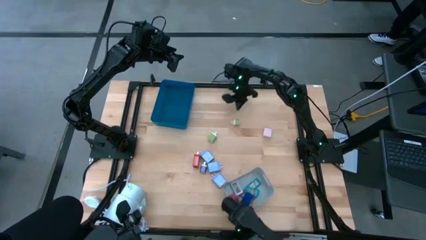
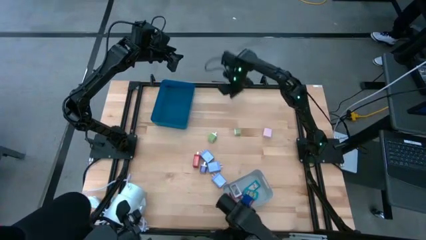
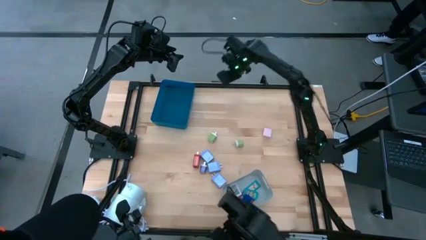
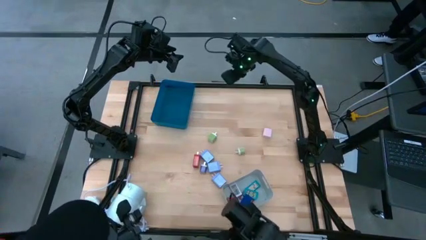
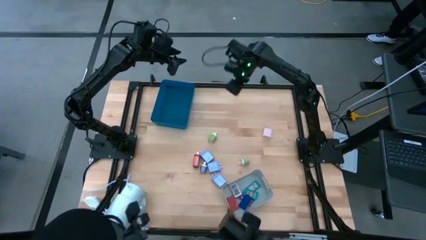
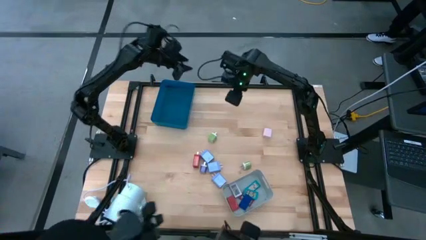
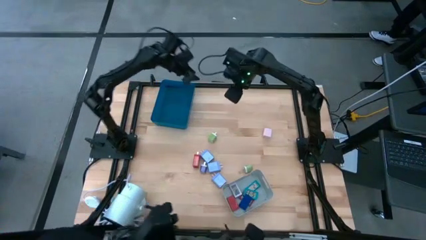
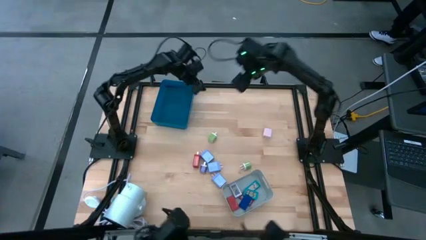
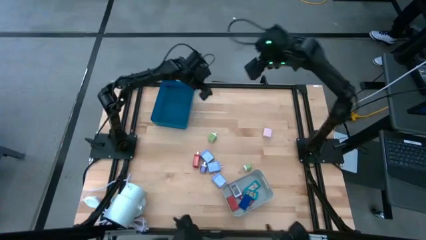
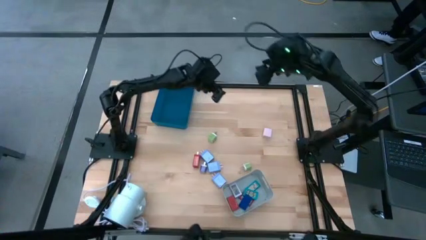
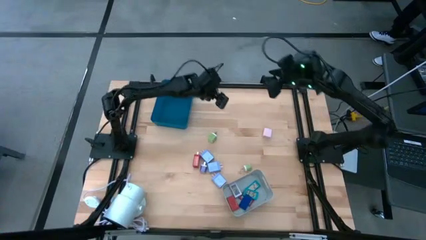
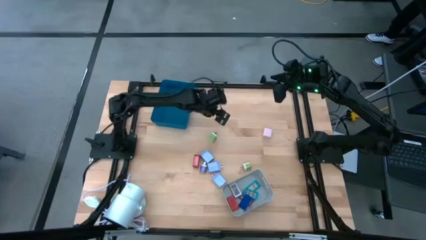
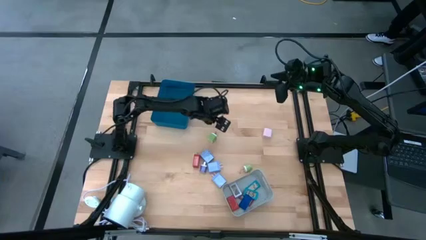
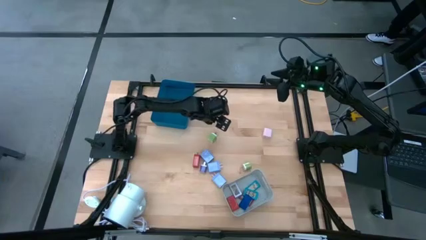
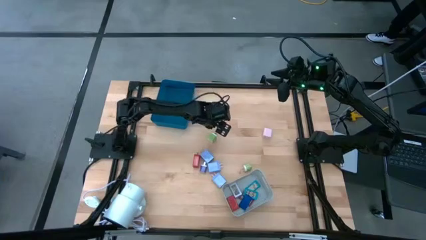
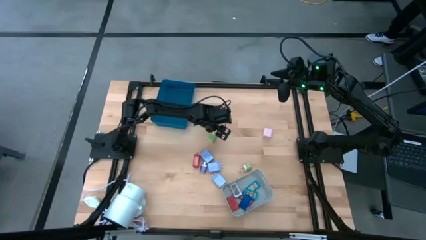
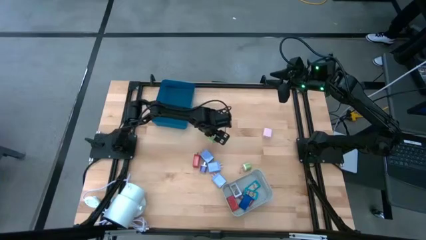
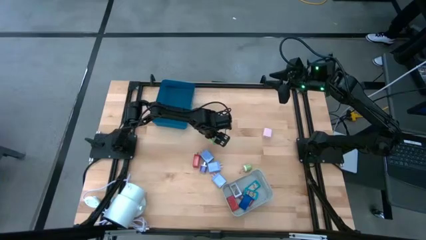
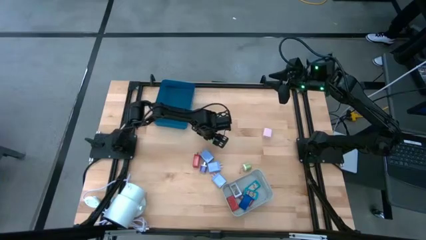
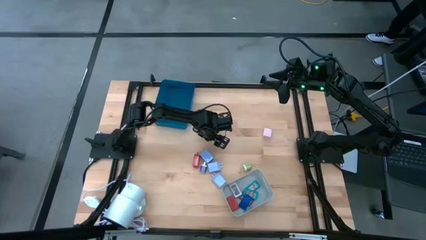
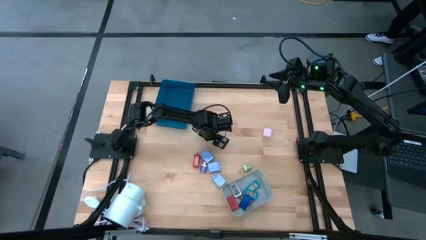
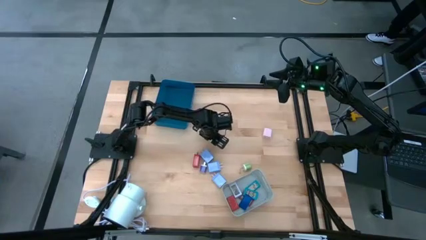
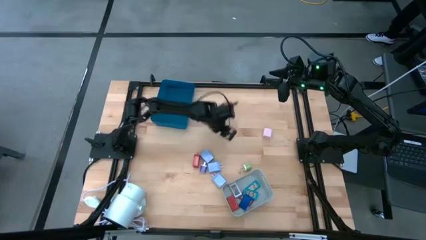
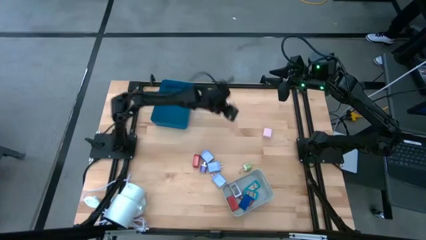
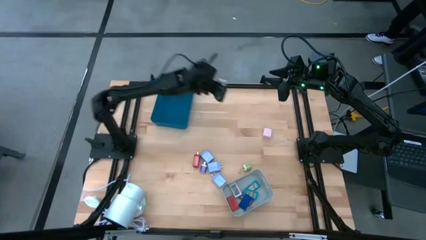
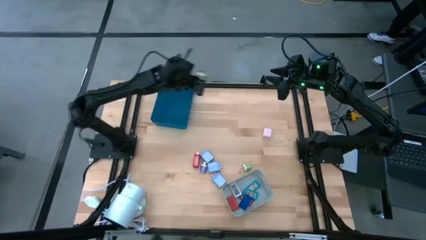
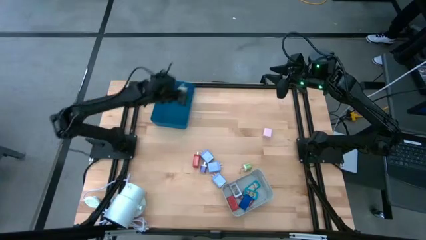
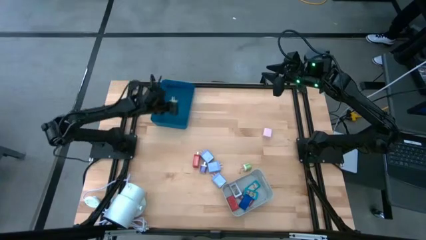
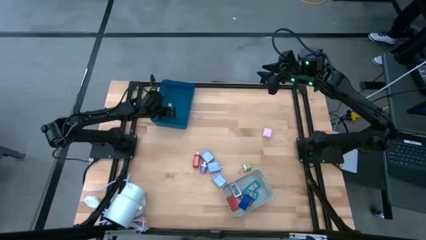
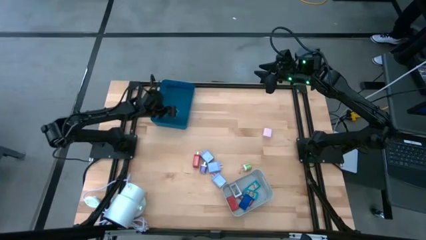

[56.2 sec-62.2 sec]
Task: Pick & Place Office items
Put the top green charger adapter into the blue bin

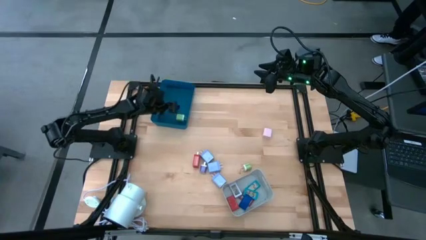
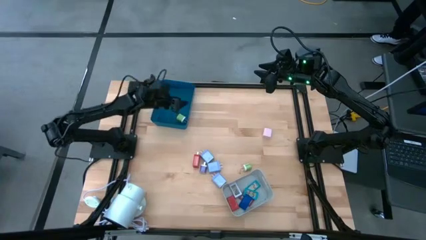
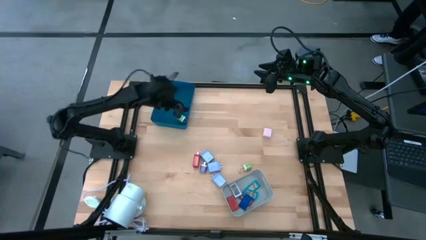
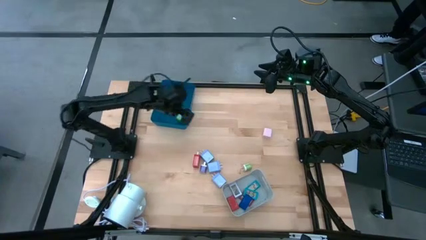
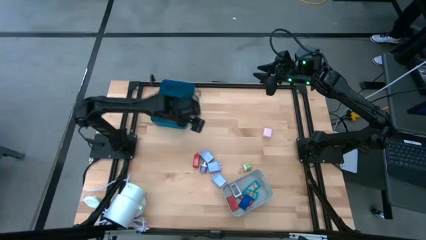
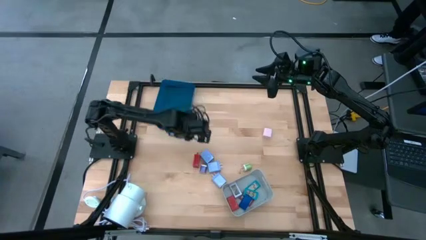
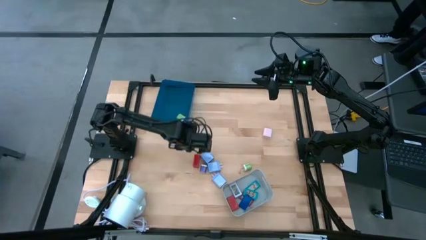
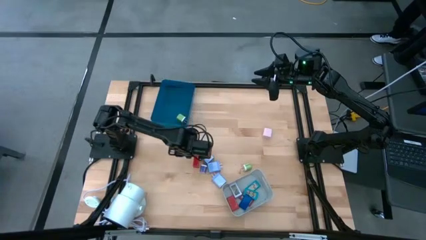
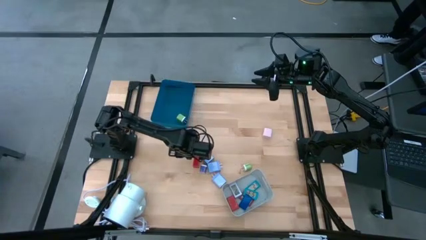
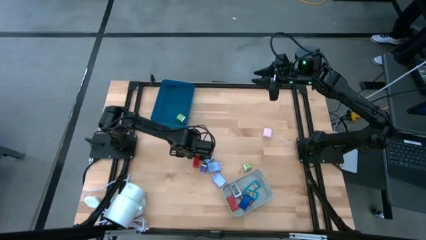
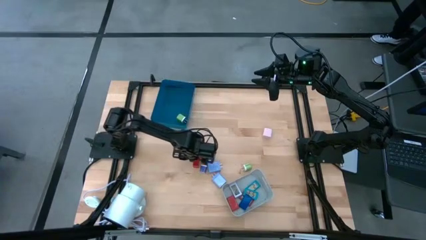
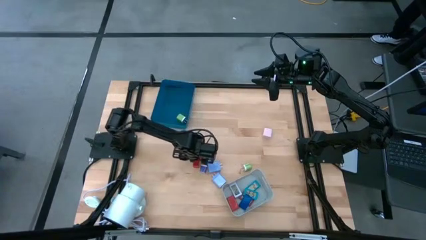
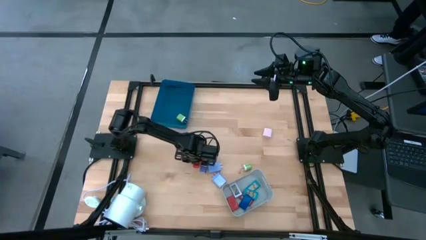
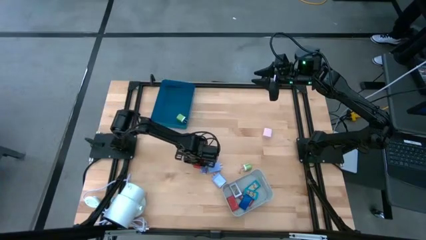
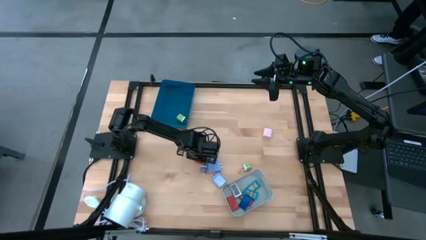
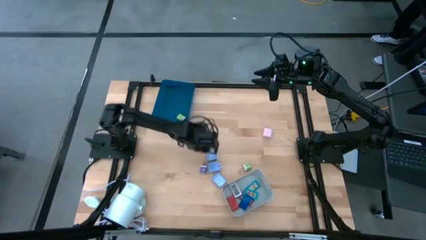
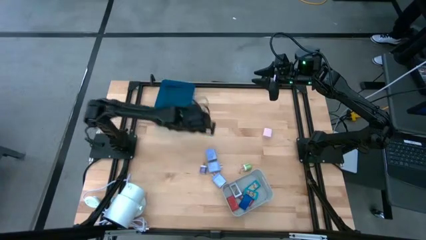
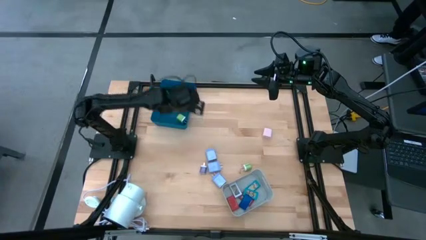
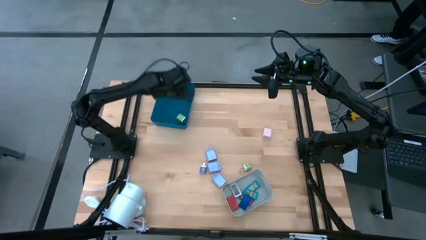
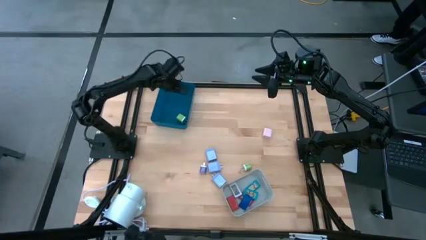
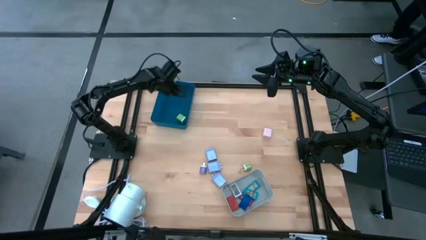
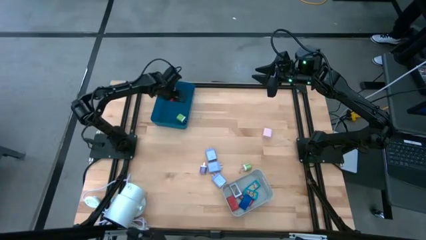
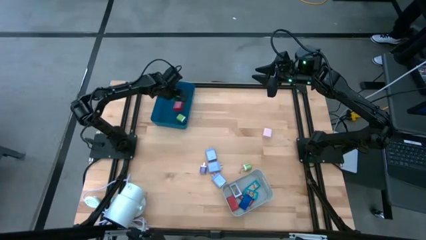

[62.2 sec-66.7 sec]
Put the red charger adapter into the blue bin

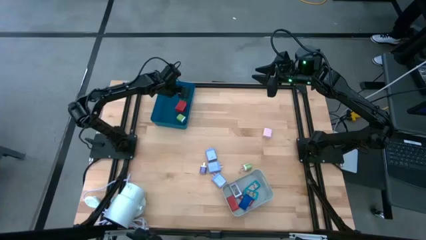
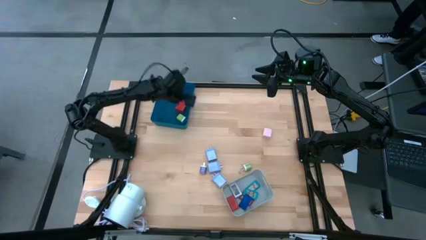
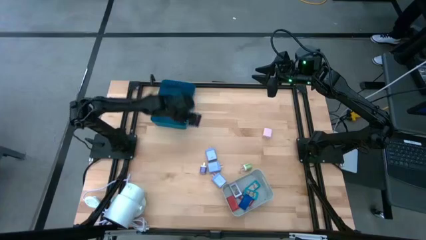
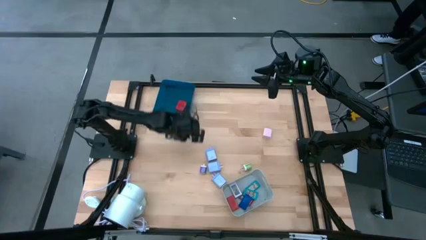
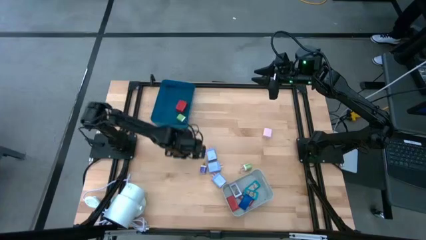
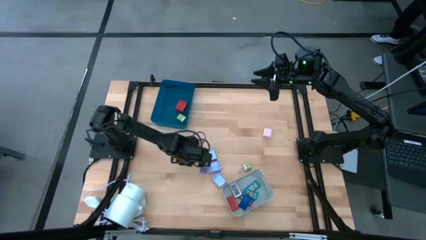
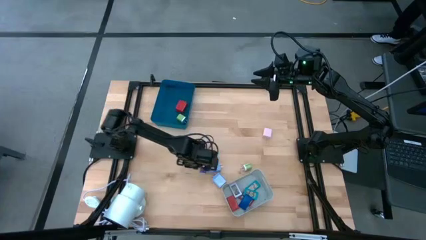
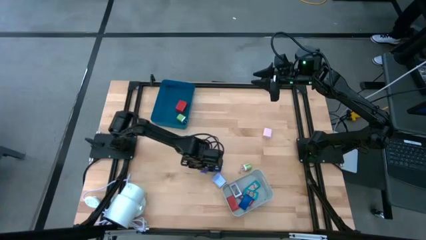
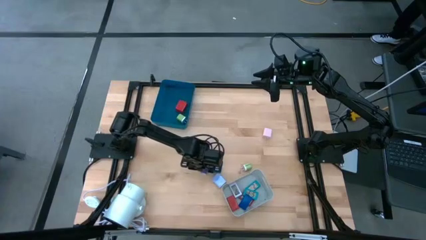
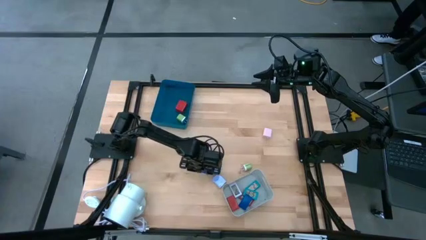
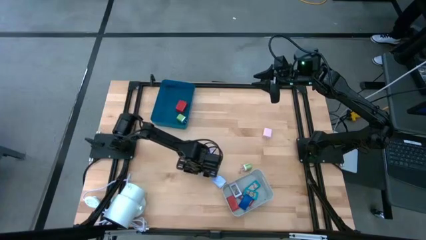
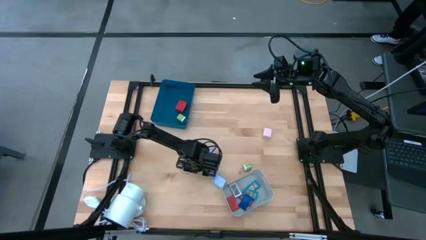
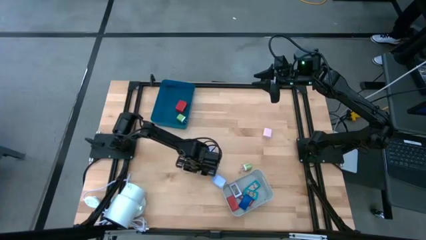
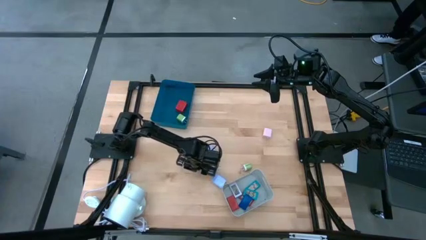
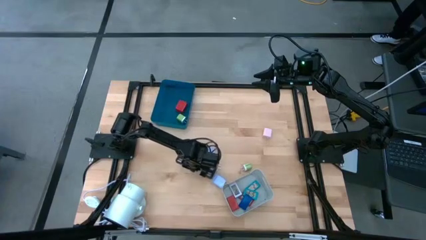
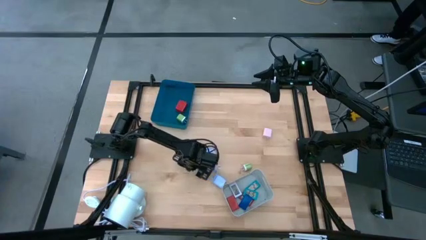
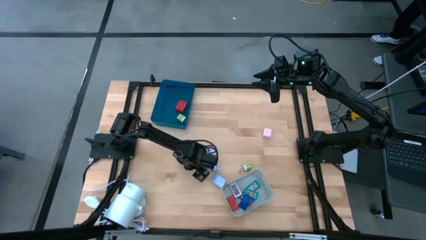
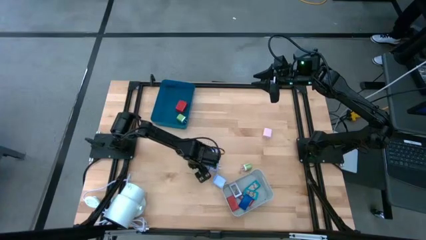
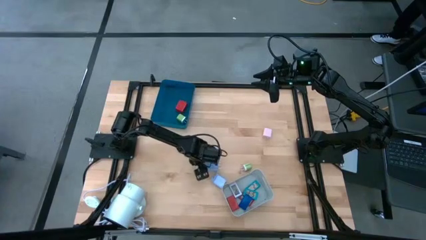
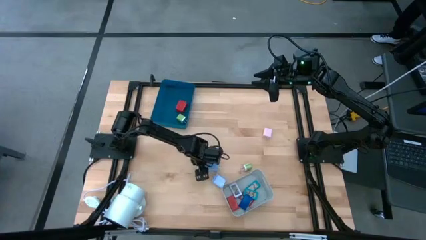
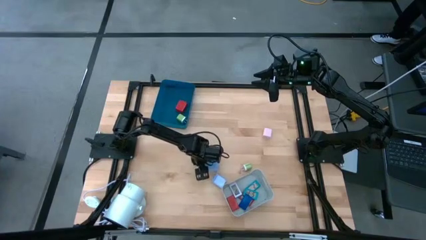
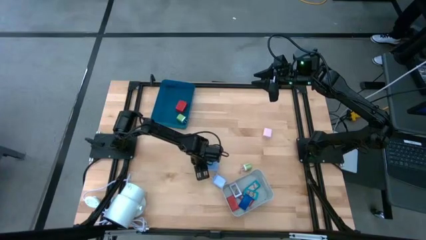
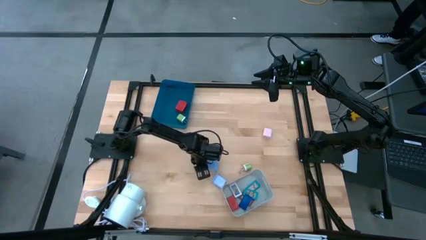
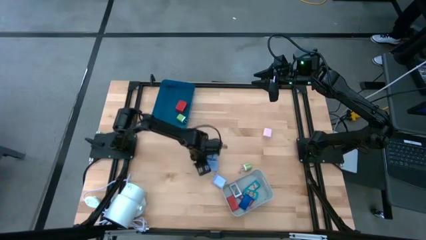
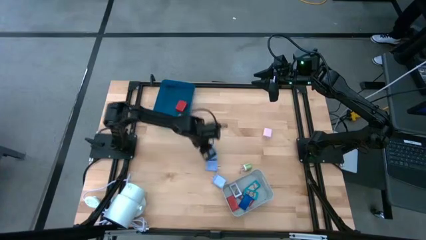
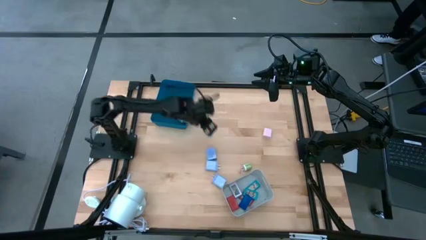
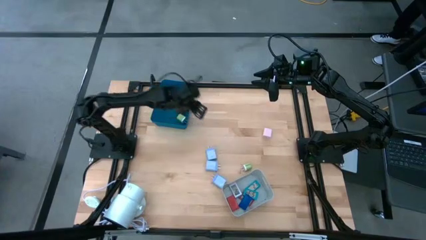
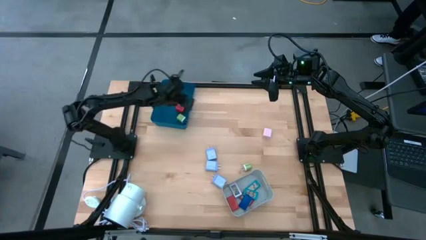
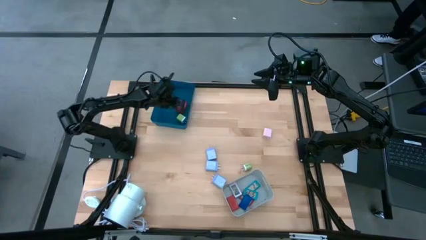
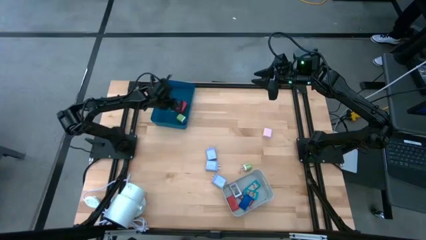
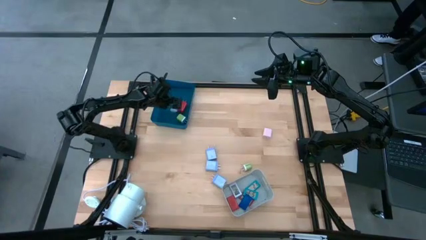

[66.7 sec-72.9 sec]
Put the violet charger adapter into the blue bin
